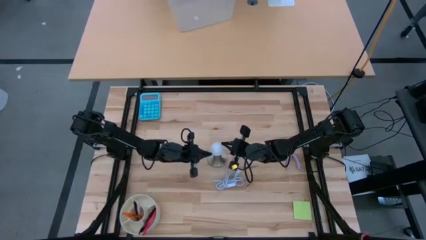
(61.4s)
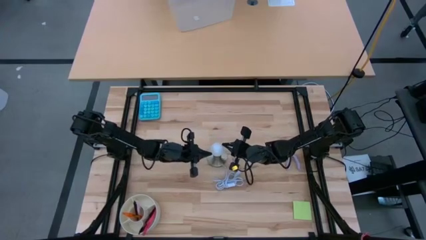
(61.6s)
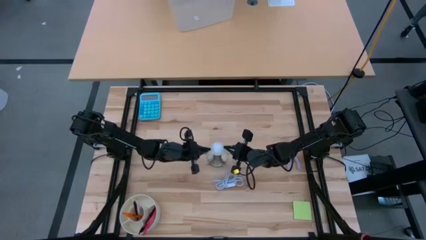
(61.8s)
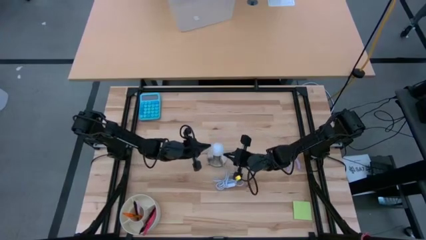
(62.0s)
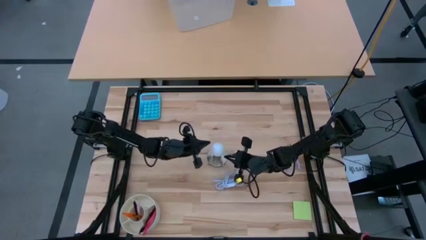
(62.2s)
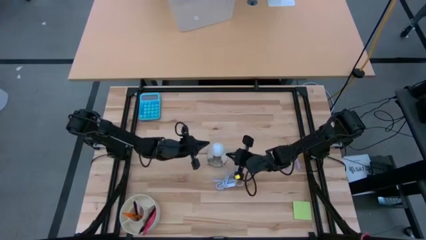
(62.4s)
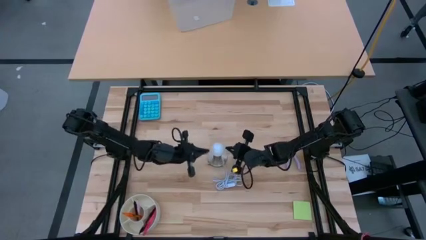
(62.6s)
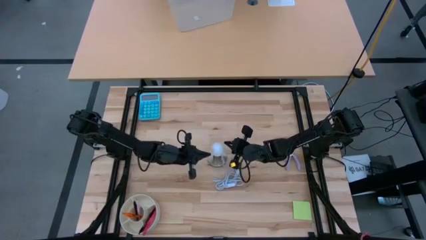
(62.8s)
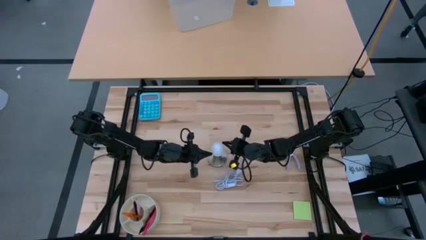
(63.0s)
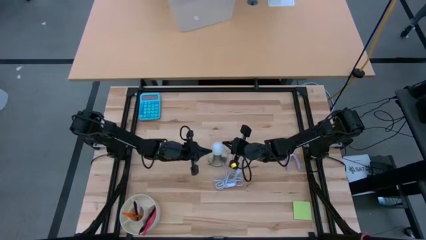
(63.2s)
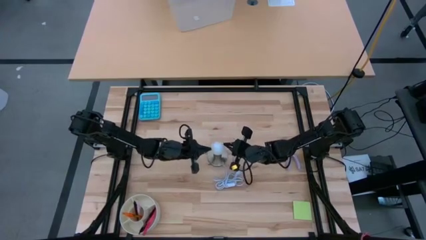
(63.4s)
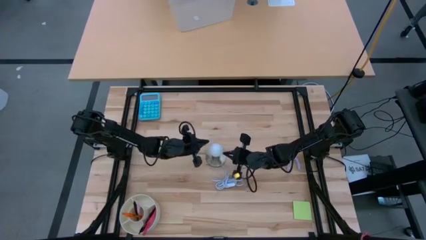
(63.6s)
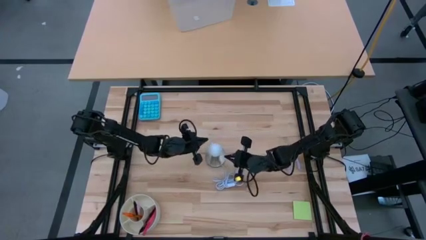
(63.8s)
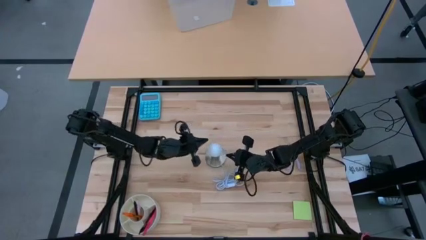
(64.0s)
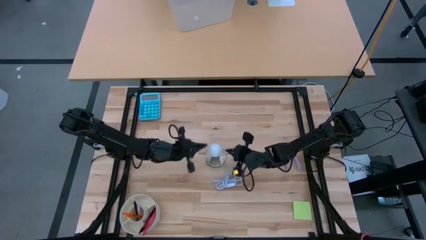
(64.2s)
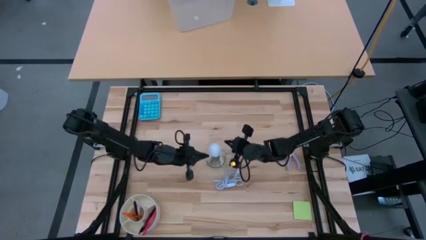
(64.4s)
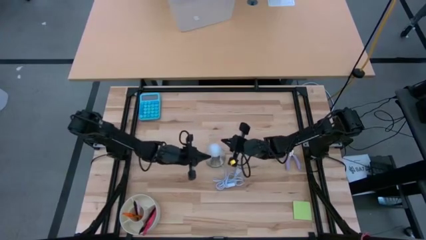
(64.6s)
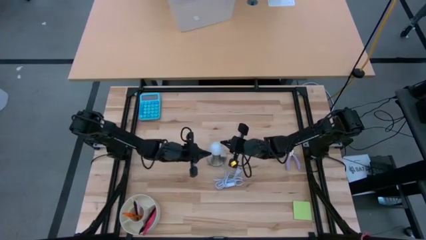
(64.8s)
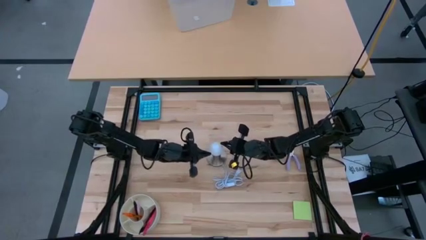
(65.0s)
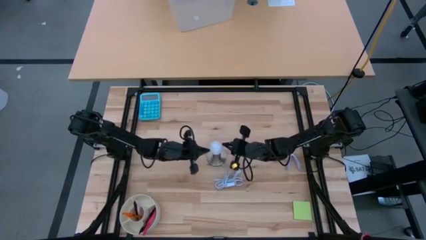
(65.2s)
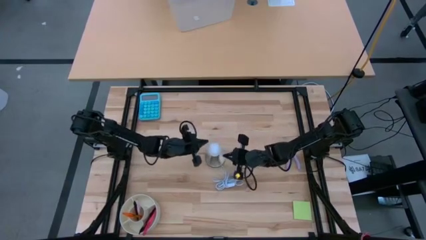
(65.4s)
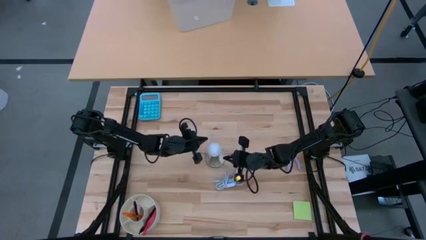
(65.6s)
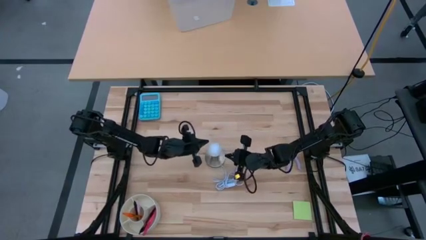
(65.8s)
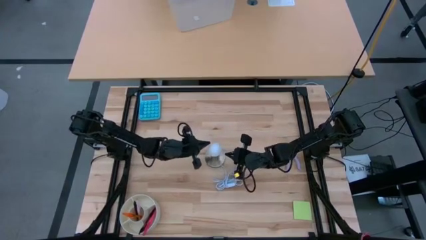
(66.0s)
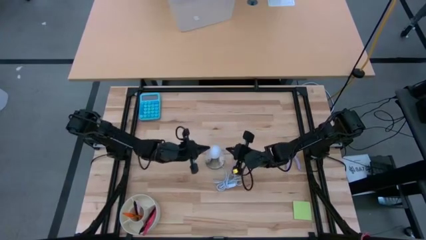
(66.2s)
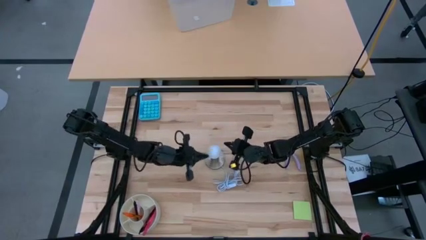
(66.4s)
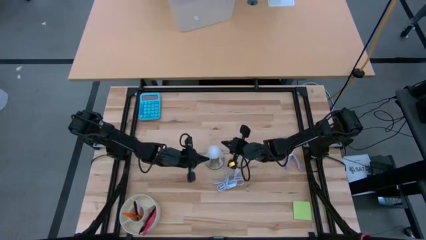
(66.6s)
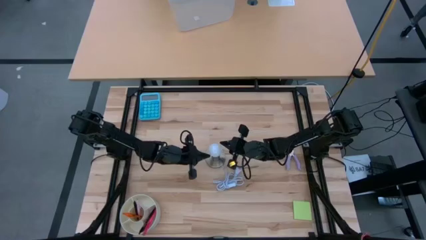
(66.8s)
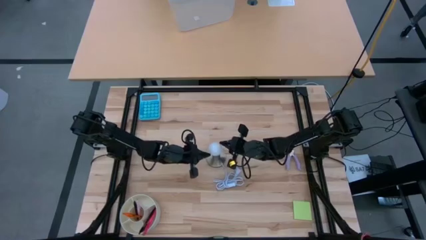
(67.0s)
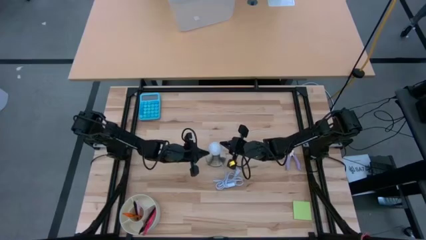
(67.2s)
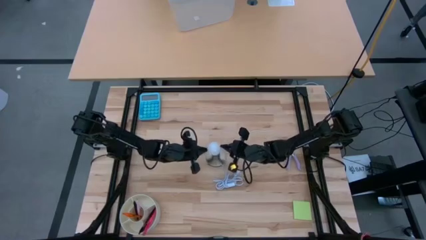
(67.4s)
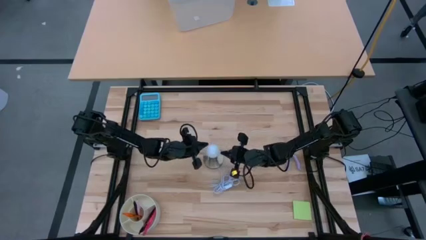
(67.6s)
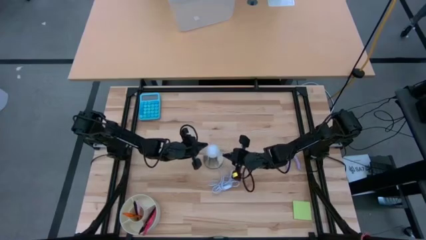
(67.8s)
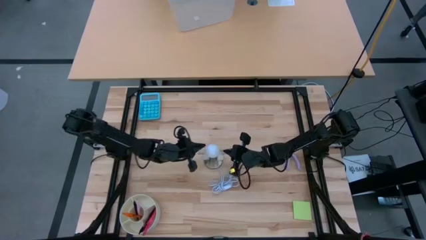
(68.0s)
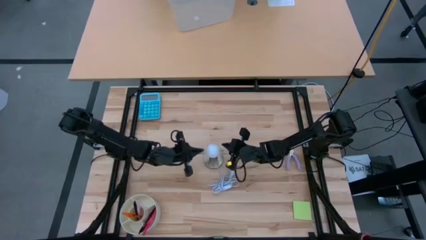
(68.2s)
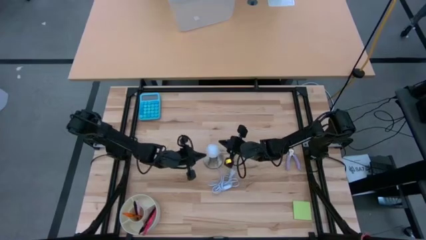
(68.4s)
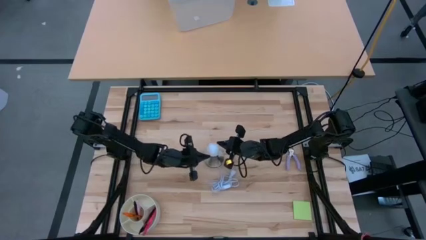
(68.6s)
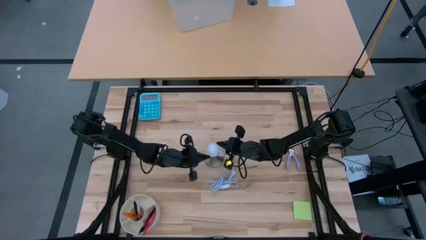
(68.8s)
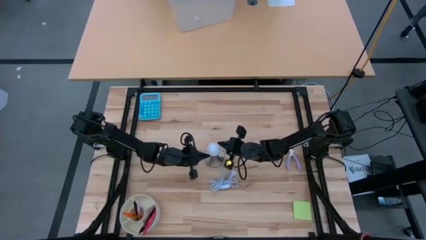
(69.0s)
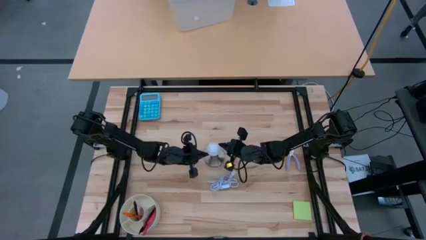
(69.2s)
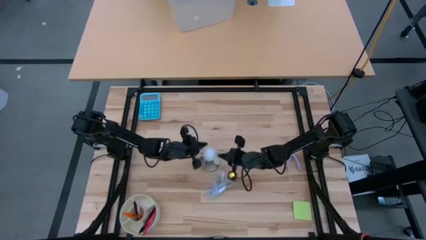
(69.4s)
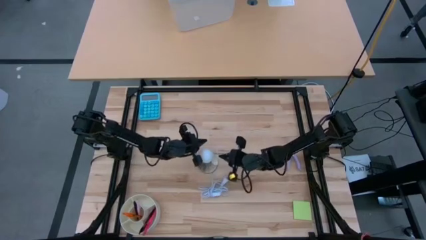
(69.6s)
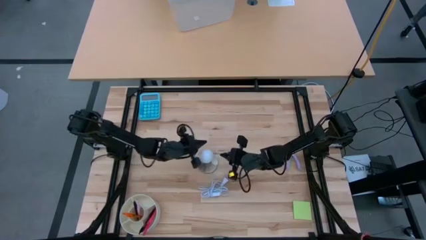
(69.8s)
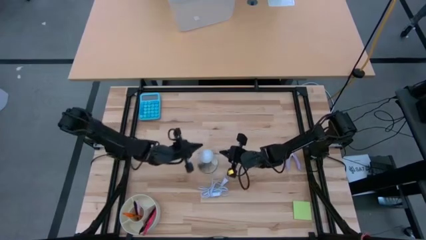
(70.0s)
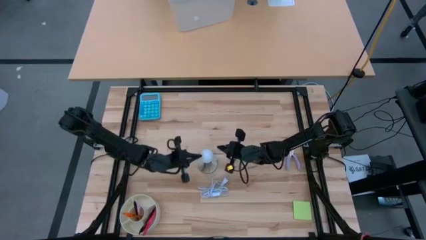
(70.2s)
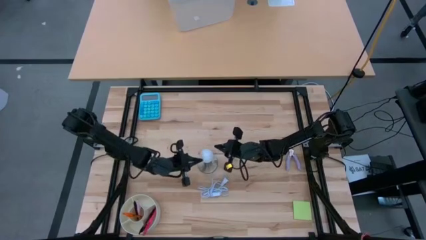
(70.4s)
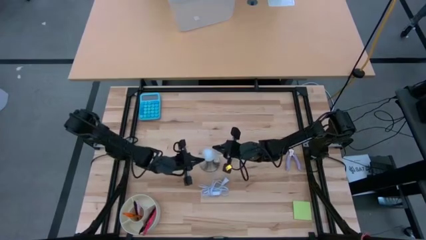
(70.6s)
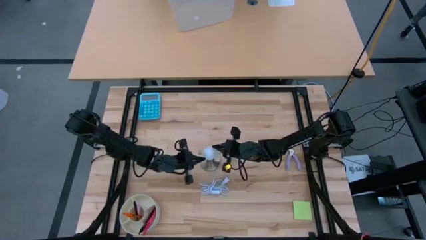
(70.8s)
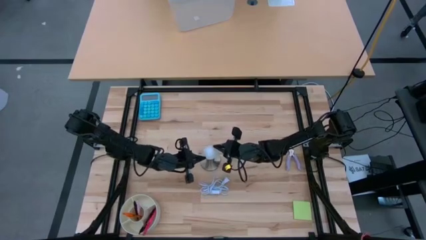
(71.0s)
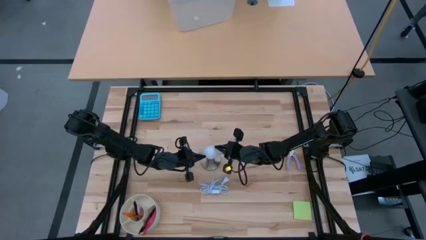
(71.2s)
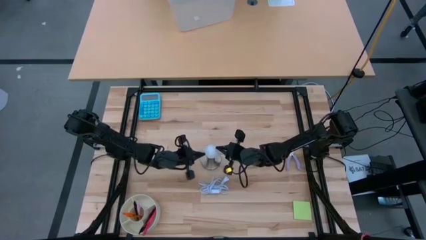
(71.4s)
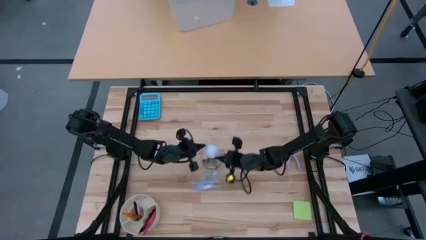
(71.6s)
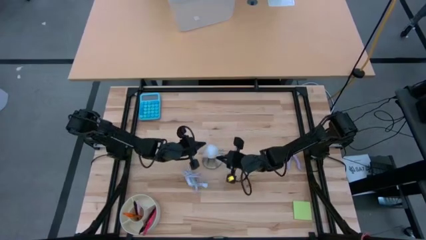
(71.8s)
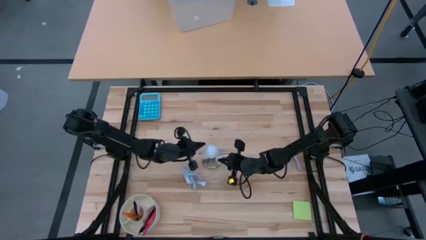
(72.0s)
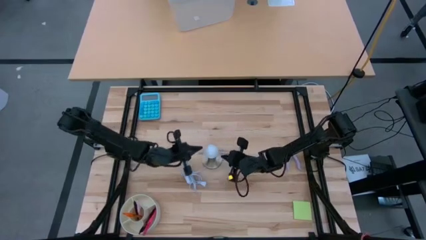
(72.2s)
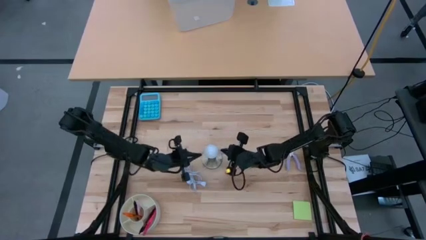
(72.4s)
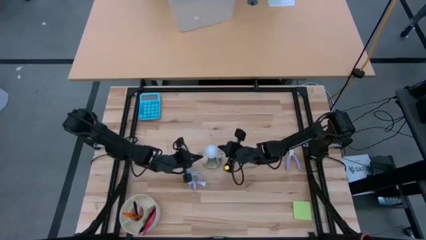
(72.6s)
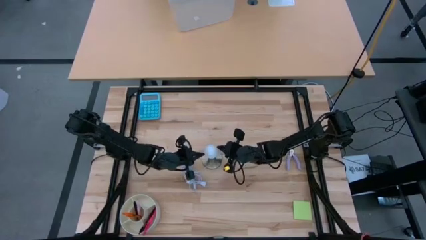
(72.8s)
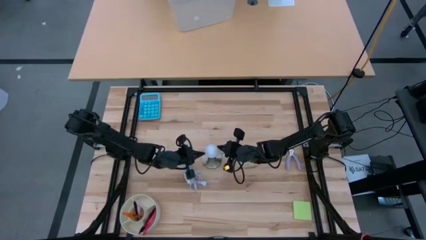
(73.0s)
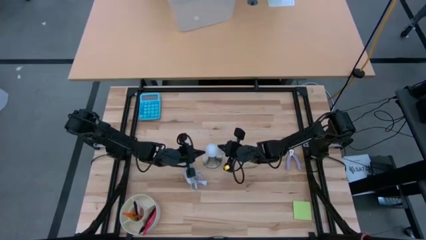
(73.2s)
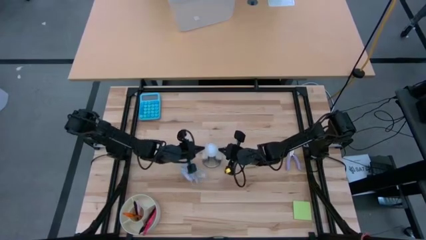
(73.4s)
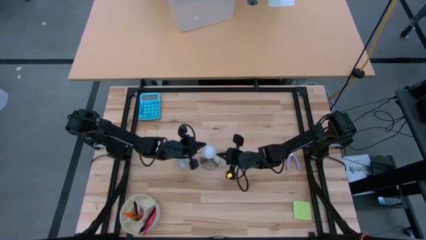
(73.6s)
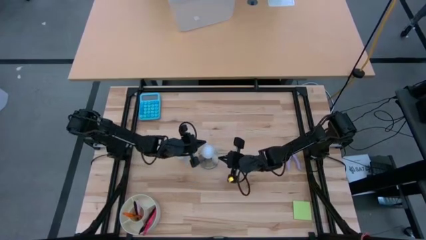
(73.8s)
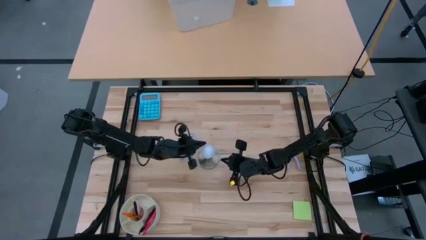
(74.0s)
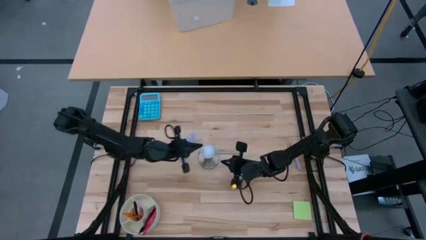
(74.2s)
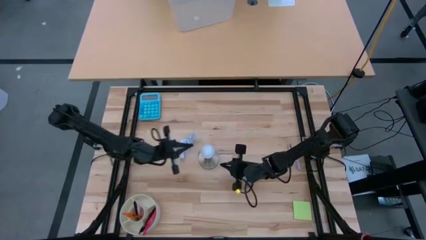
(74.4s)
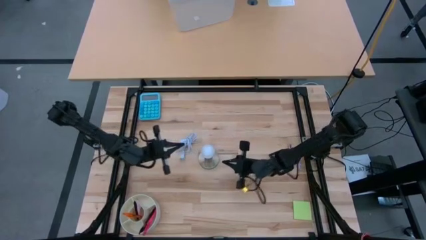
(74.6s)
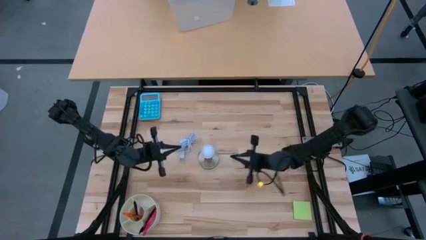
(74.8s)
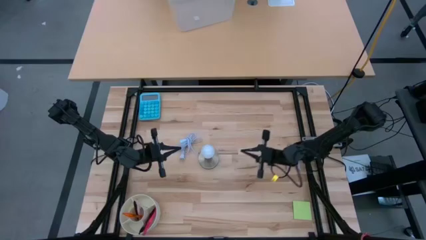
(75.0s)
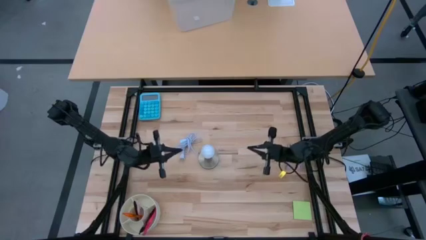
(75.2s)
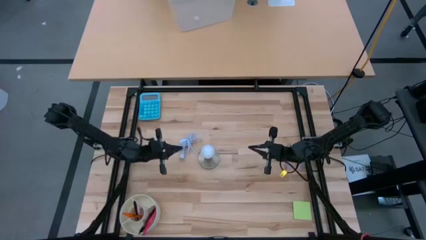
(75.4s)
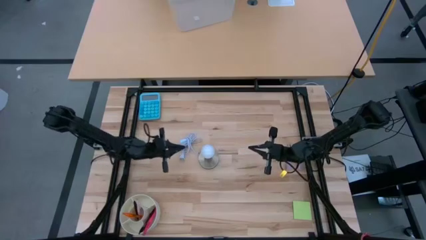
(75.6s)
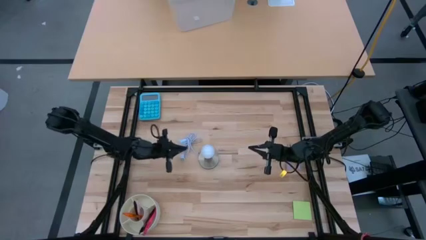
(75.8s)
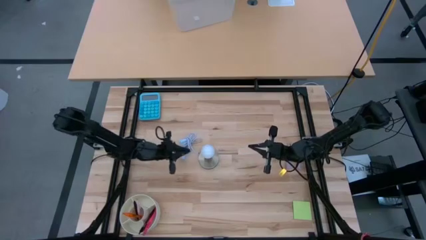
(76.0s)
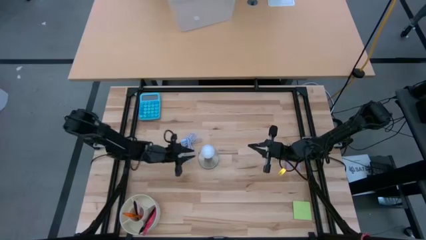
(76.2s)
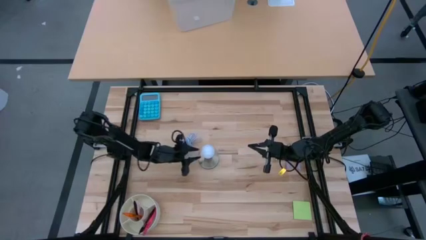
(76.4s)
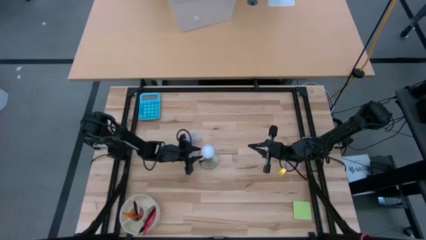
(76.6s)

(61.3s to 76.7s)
Task: Screw lightbulb
Insert the light bulb into the lamp
